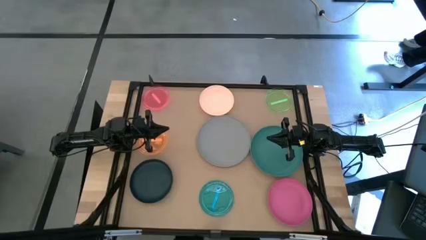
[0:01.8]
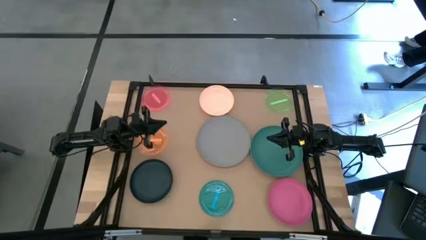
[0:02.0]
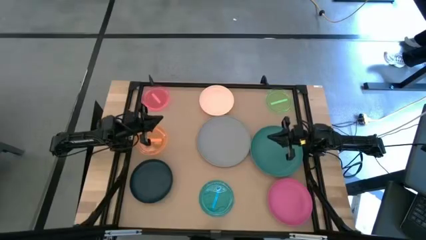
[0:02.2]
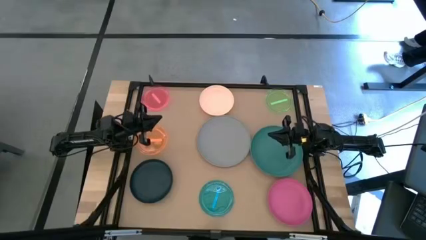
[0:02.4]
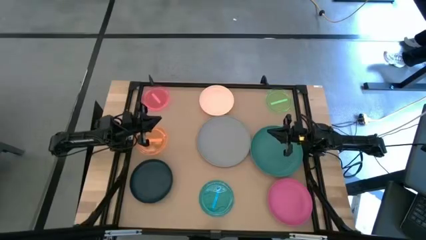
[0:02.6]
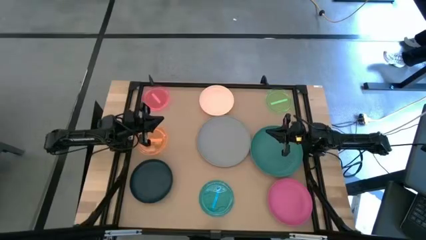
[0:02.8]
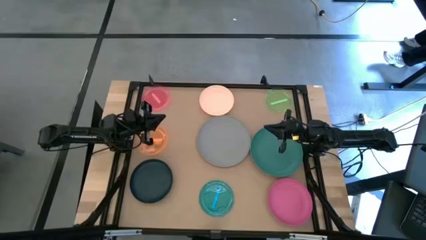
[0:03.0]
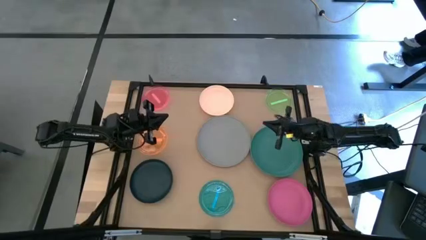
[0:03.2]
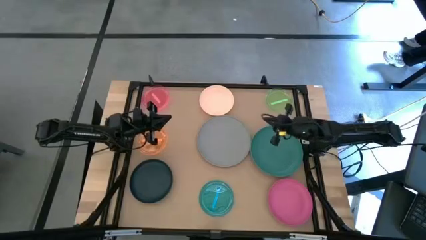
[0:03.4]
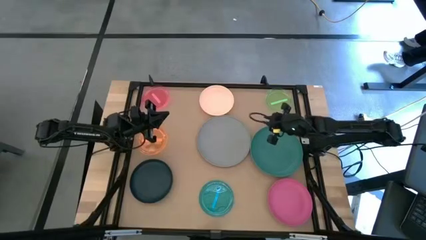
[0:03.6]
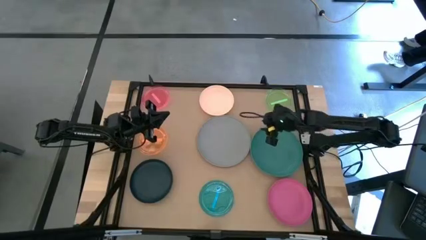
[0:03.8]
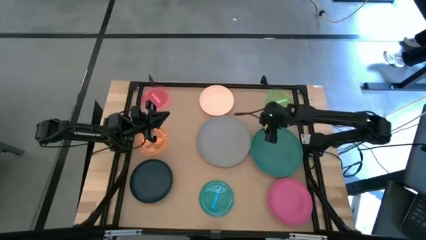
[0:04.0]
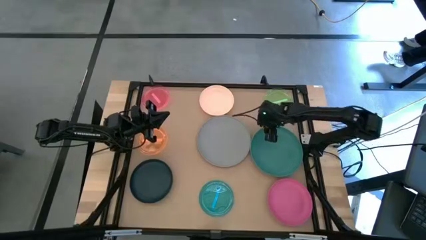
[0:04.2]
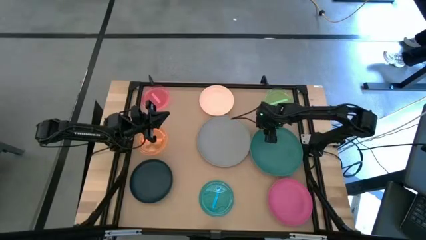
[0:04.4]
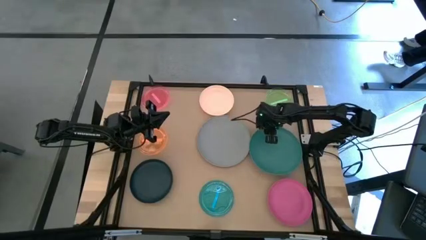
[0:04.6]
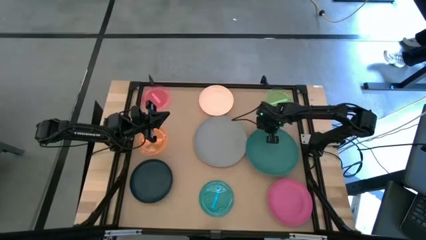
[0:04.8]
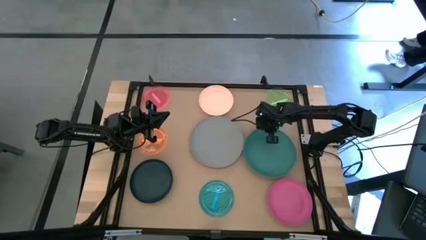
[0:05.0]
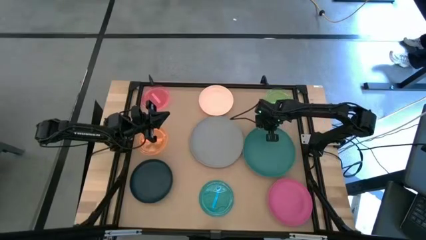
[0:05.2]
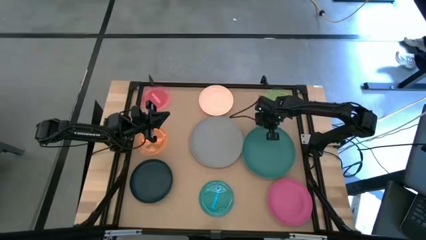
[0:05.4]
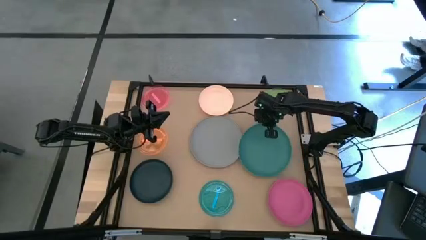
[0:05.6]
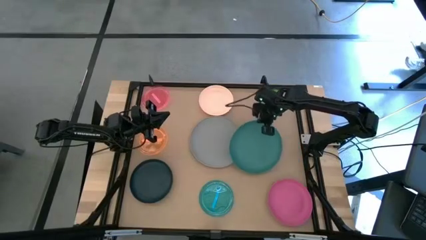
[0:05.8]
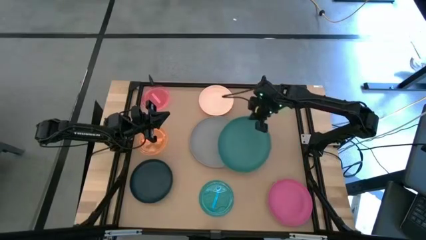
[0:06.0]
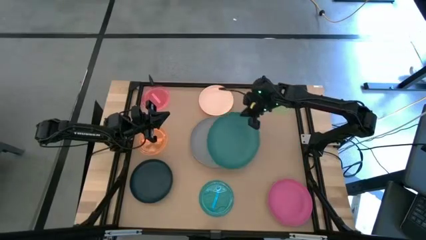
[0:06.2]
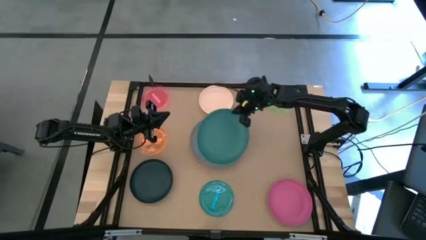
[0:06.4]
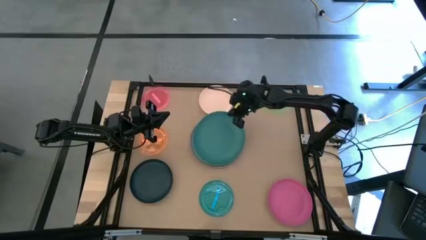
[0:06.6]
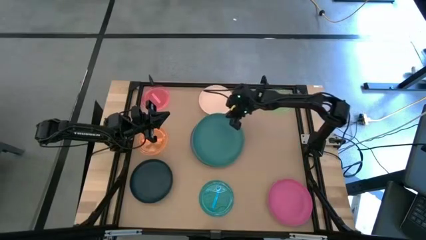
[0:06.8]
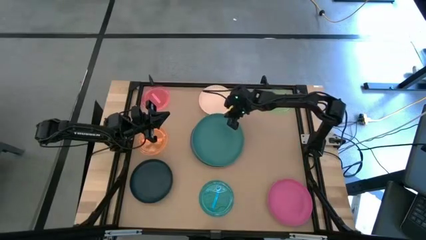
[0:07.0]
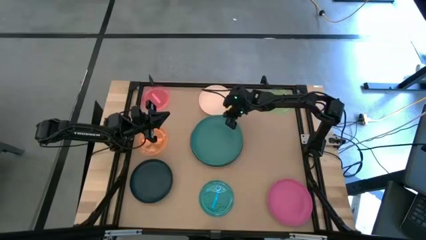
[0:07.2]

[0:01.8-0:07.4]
Task: Stack plastic plates
Stack the green plate on top of the gray plate

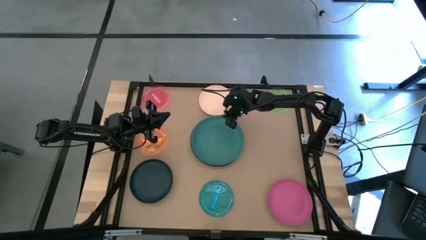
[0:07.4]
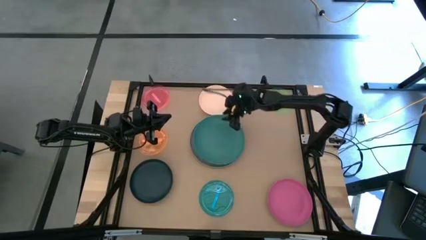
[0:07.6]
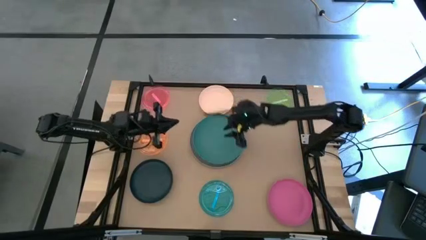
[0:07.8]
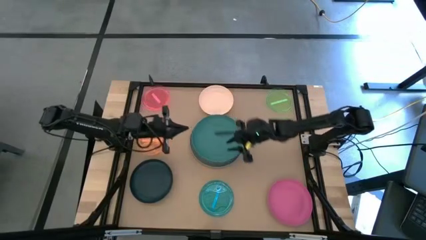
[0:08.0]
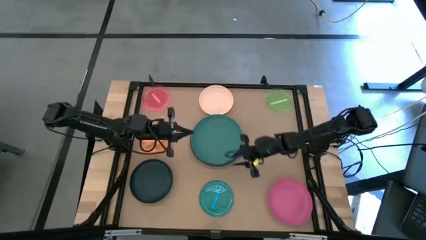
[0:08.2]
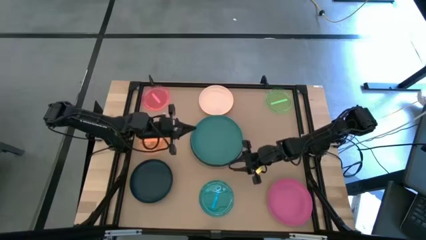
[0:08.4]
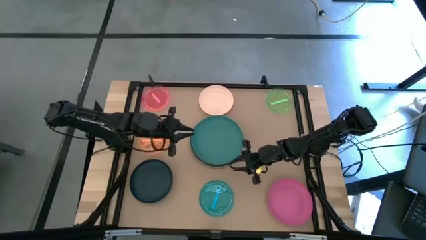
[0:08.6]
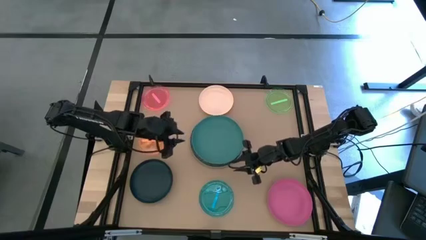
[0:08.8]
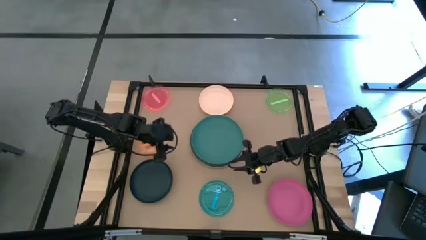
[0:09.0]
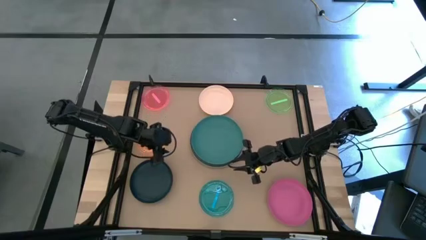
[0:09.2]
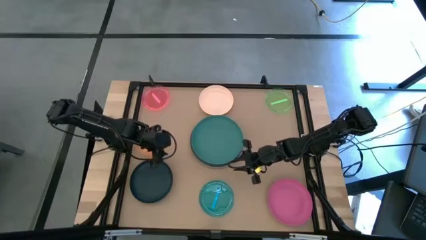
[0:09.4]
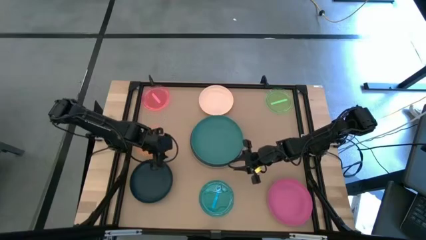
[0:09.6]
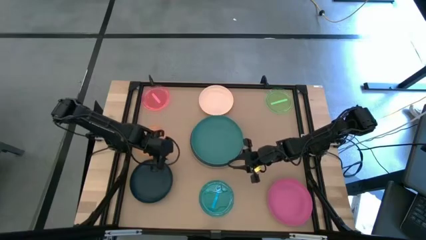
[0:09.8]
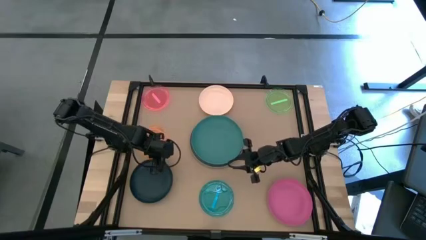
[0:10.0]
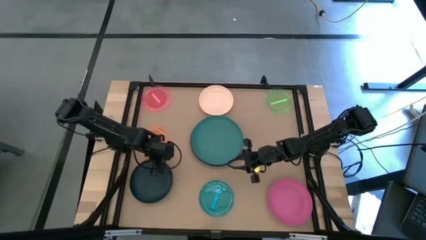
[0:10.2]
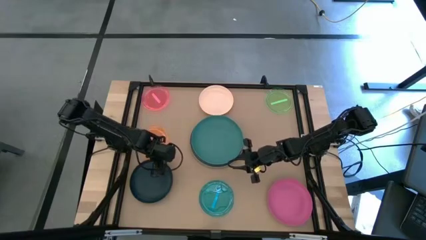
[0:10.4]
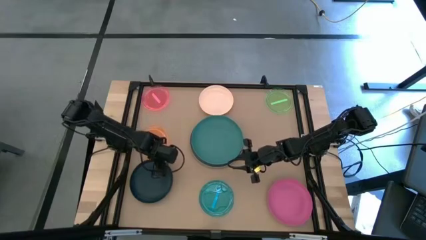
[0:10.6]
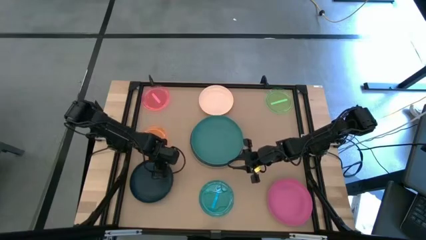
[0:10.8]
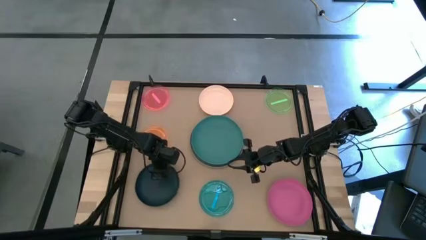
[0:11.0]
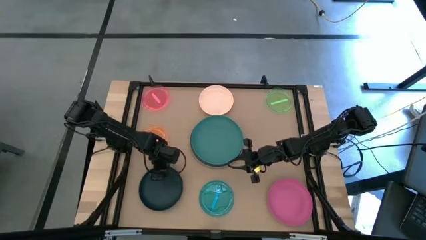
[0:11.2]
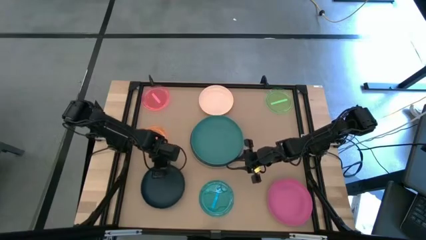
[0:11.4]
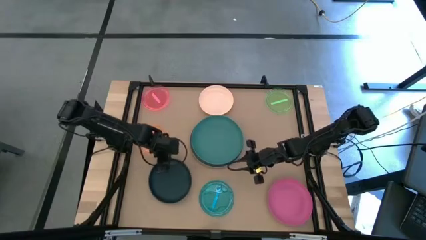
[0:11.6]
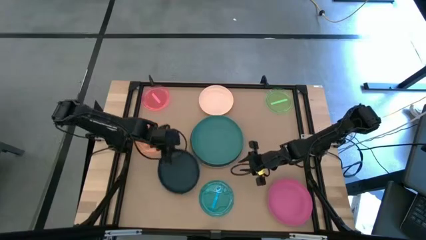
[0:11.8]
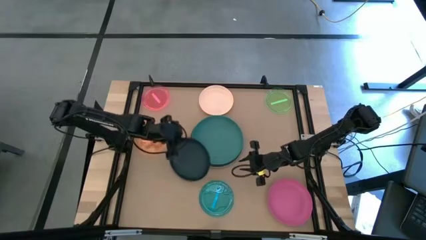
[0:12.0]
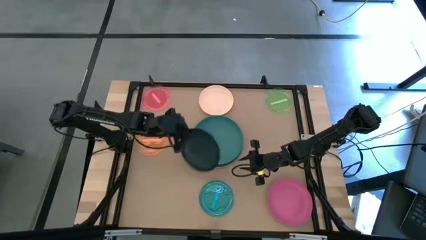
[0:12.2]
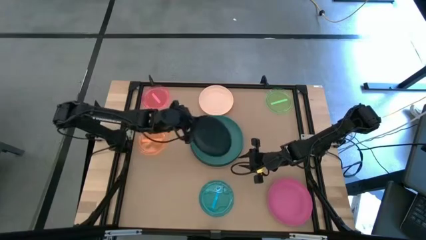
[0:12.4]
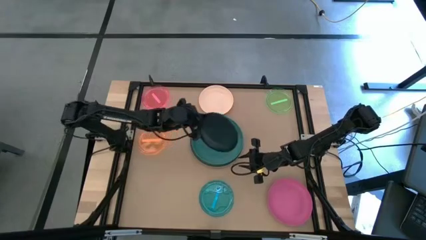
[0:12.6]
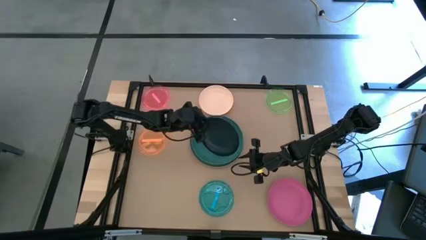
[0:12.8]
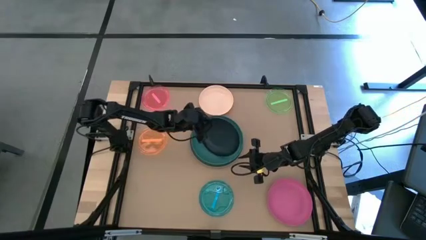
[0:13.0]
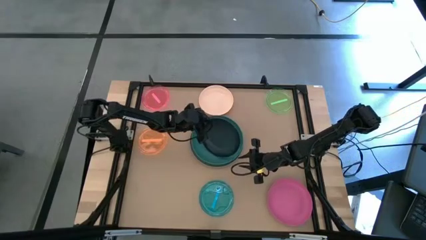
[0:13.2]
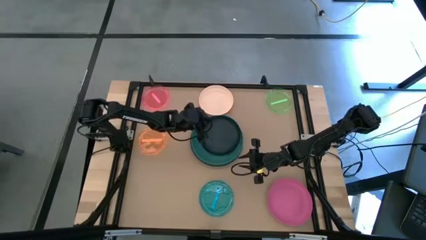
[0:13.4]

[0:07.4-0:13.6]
Stack the black plate on top of the green plate

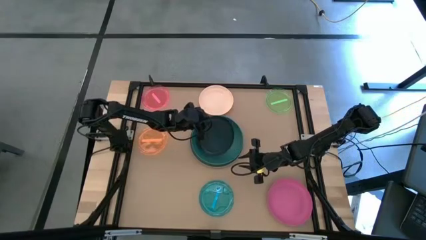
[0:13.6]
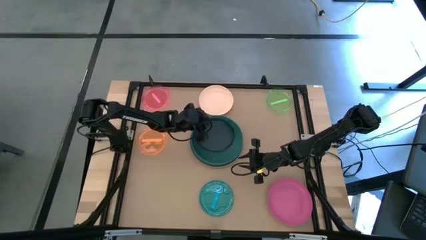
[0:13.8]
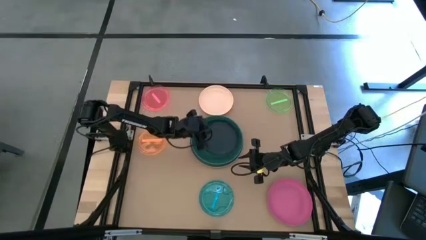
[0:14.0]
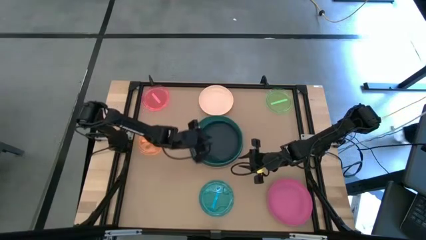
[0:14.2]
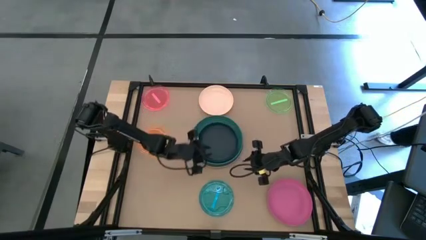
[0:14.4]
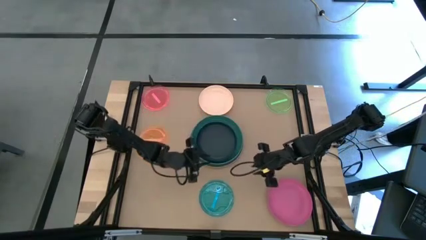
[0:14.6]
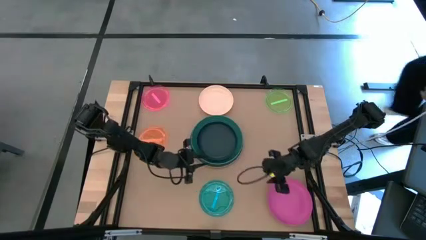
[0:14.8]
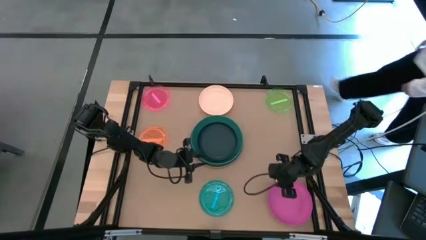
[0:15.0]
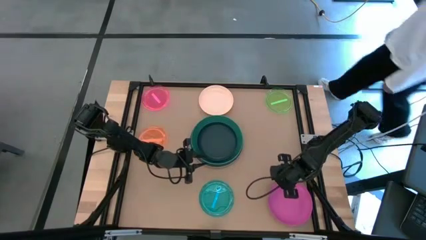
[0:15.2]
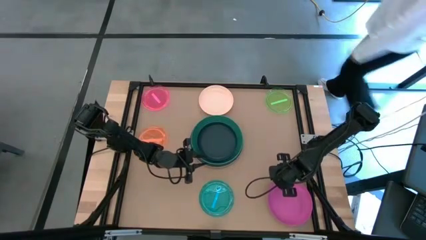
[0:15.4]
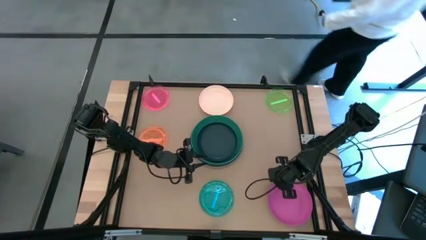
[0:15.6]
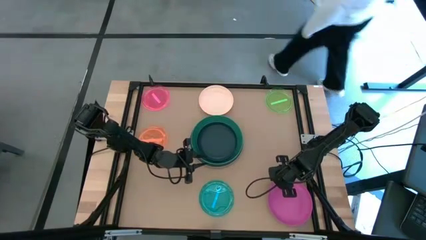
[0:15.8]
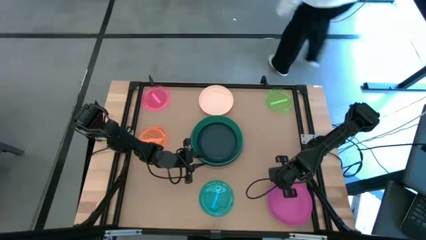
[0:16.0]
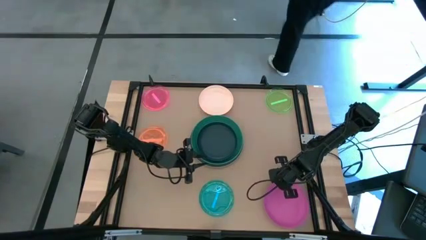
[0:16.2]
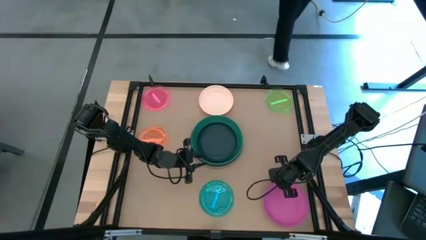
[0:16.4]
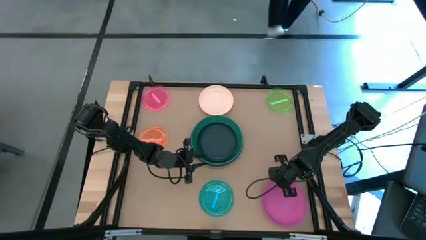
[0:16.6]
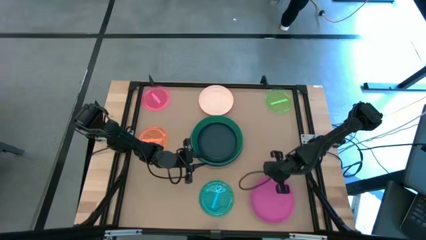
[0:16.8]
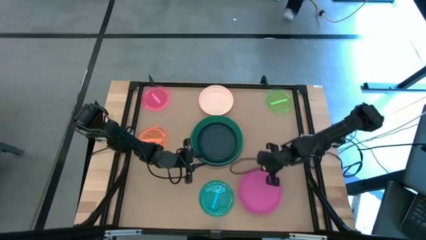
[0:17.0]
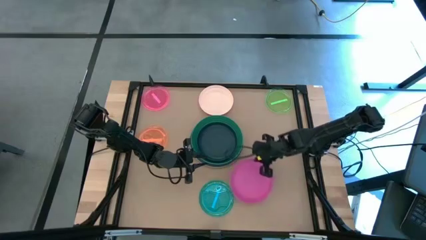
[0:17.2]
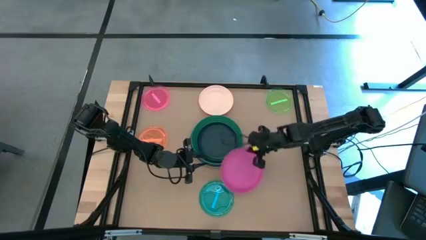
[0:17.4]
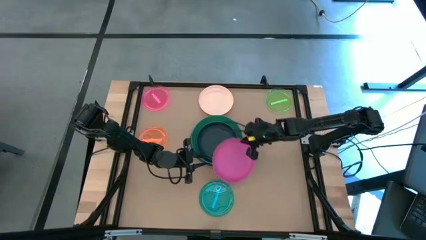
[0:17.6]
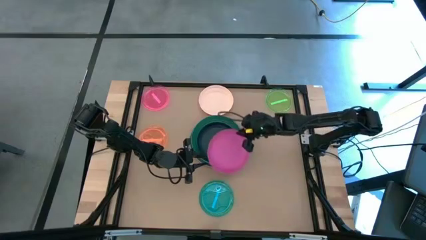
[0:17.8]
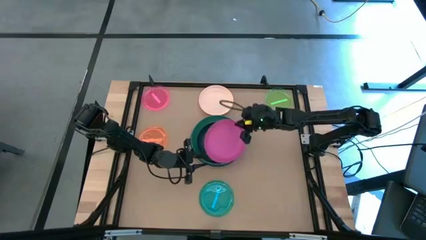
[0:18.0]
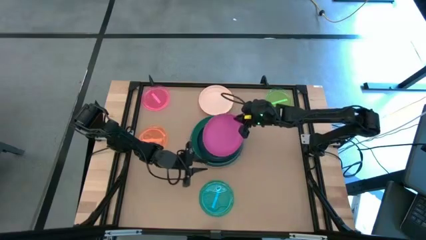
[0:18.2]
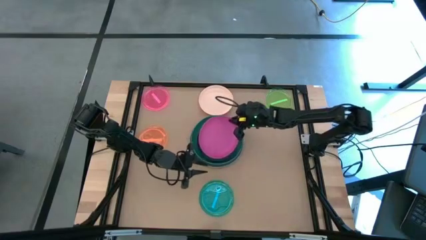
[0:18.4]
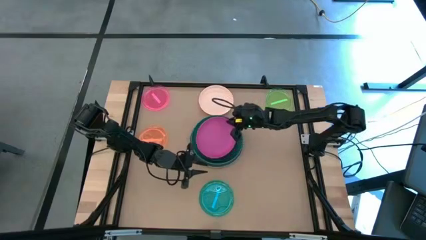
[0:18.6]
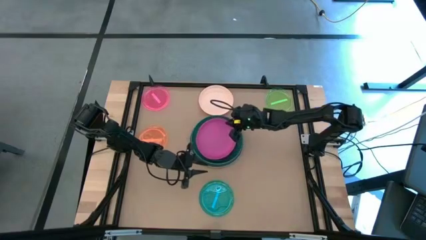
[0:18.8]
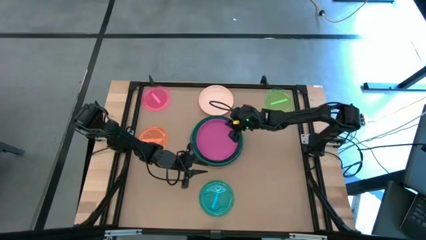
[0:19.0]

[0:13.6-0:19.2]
Stack the pink plate on top of the black plate
